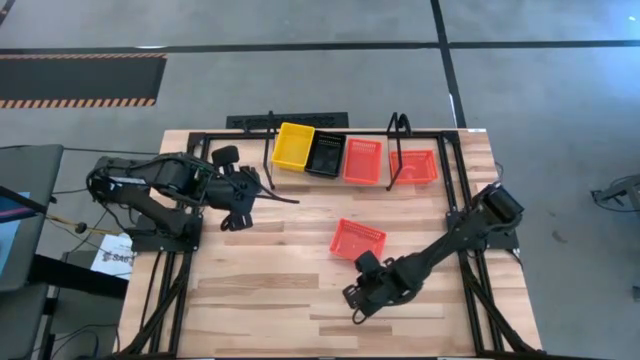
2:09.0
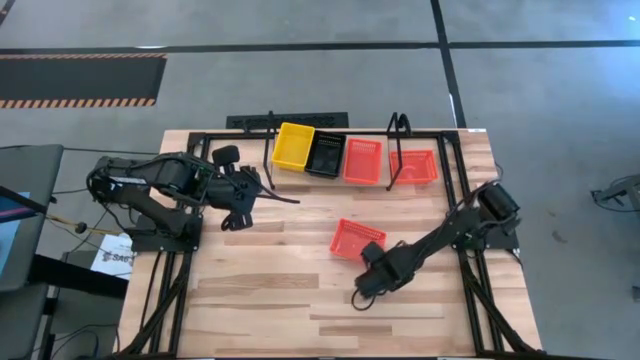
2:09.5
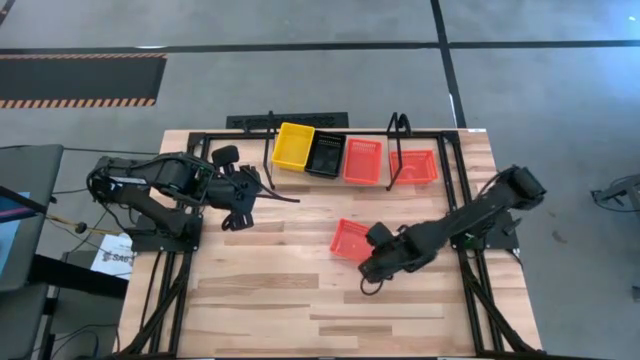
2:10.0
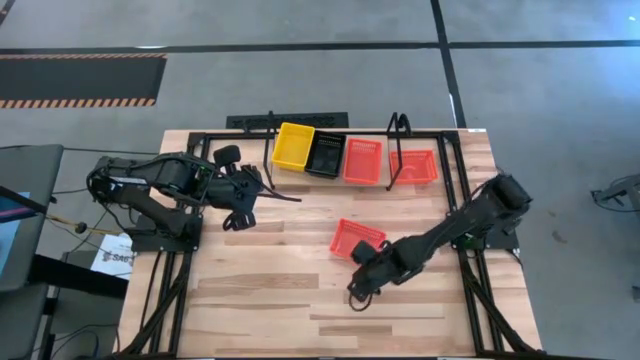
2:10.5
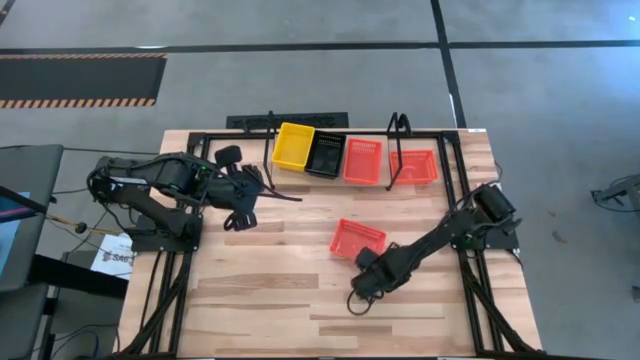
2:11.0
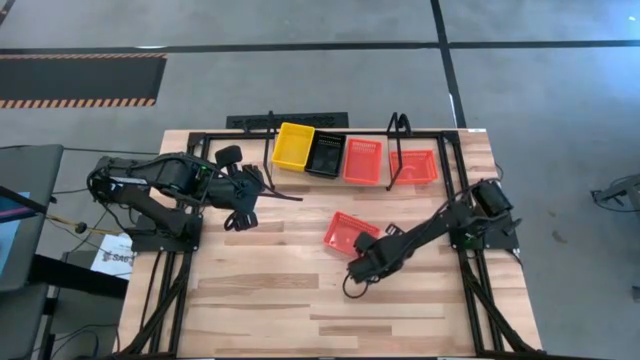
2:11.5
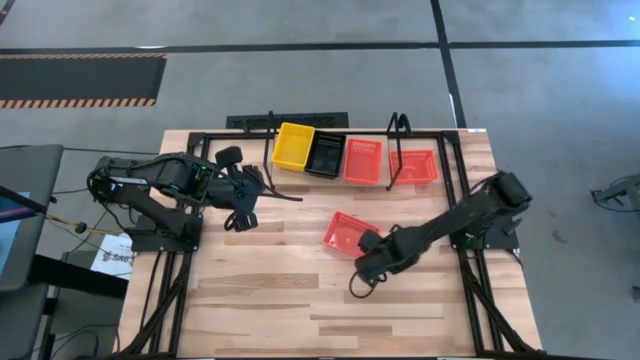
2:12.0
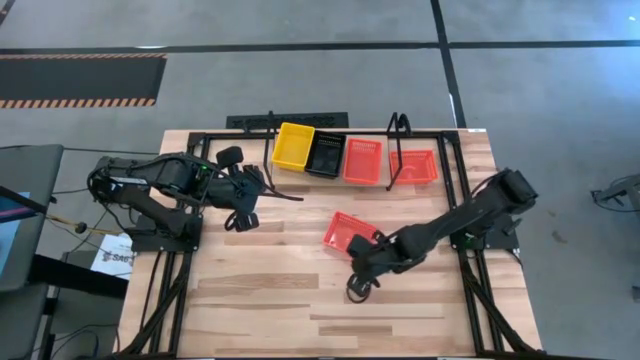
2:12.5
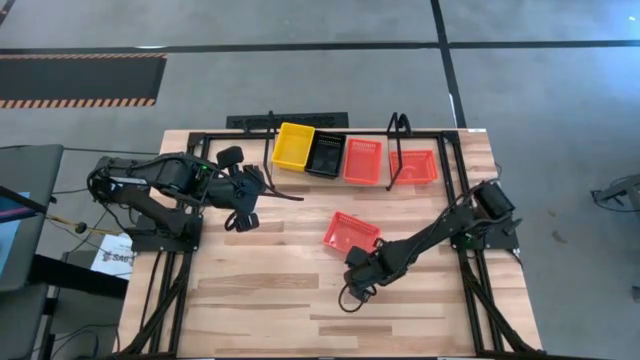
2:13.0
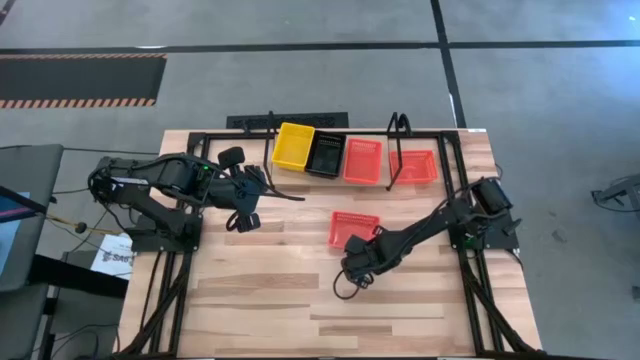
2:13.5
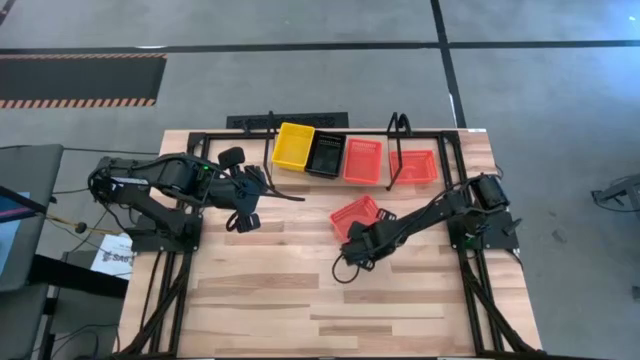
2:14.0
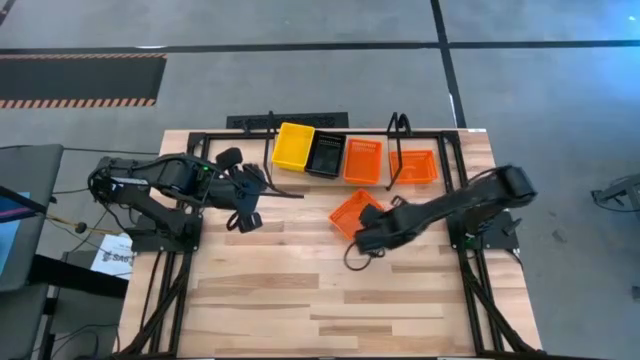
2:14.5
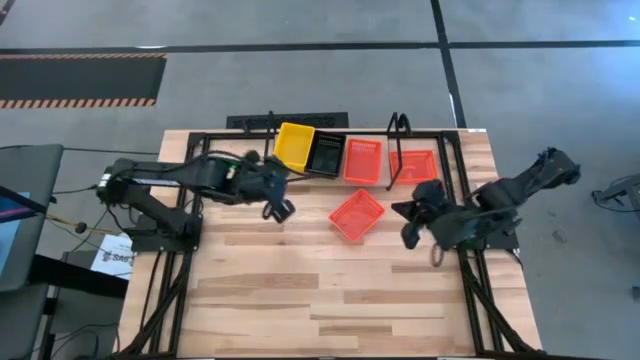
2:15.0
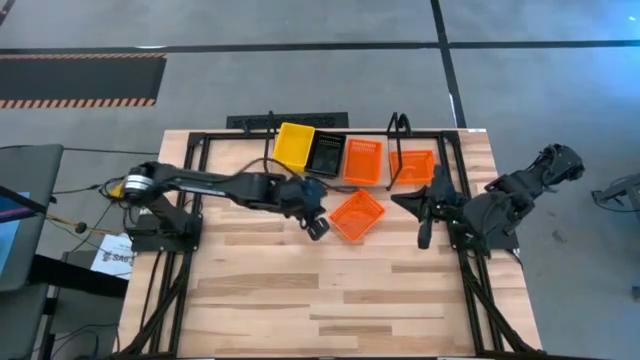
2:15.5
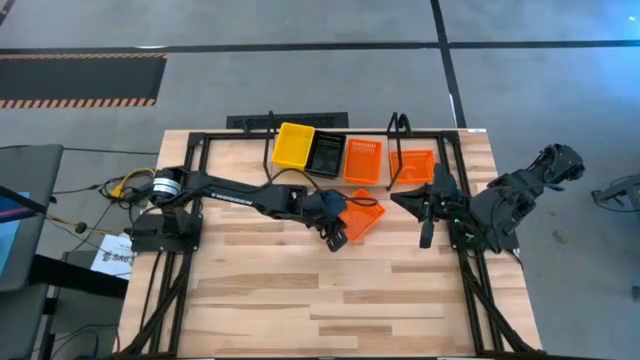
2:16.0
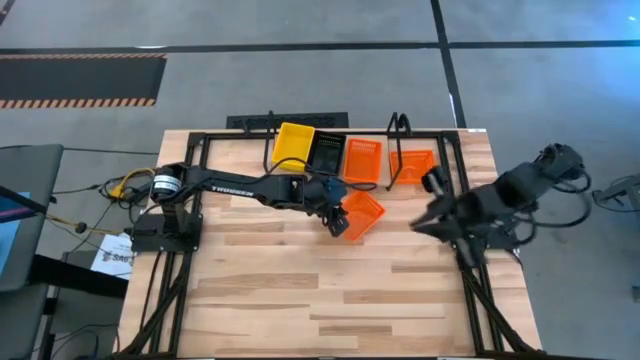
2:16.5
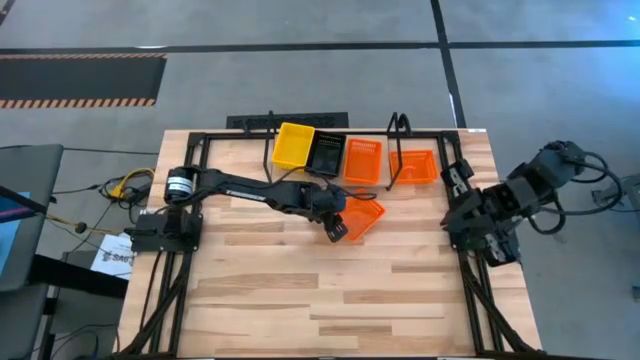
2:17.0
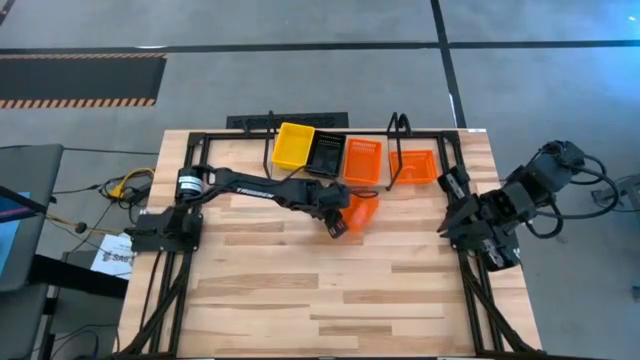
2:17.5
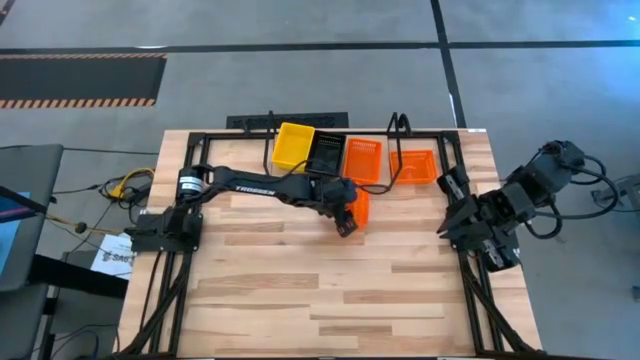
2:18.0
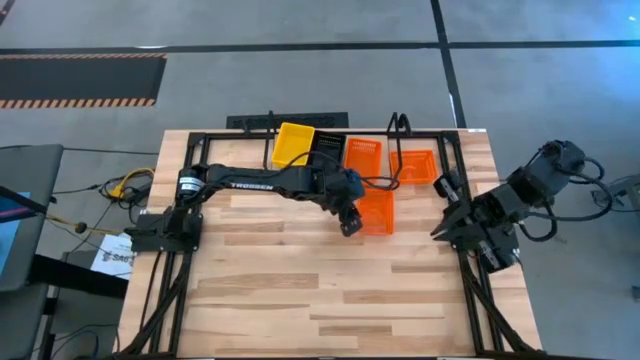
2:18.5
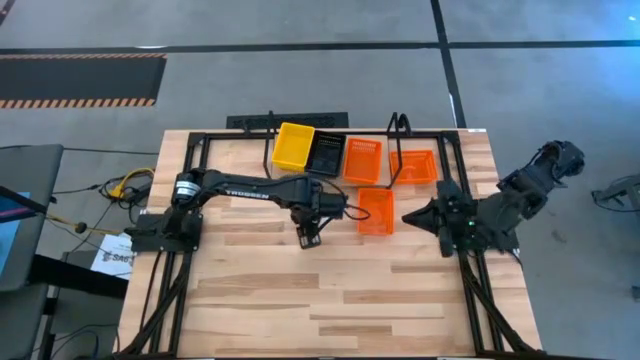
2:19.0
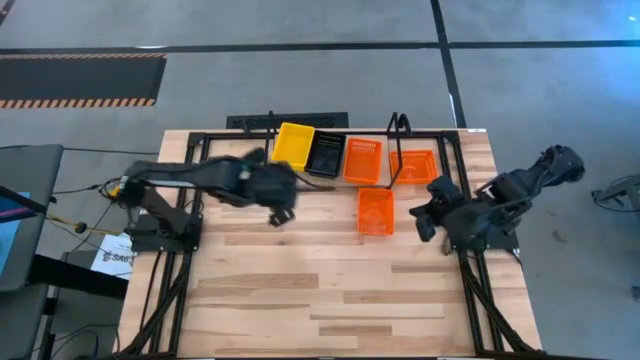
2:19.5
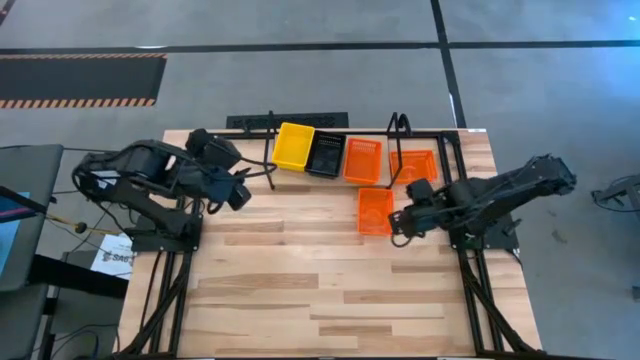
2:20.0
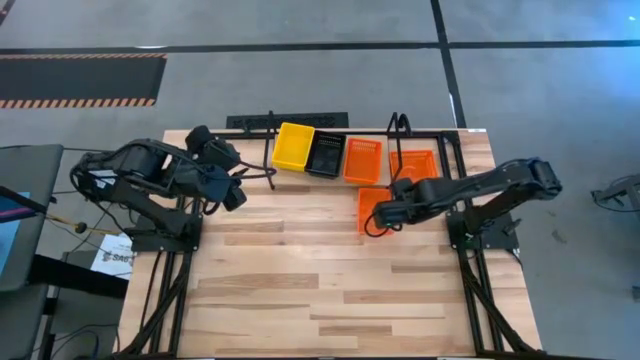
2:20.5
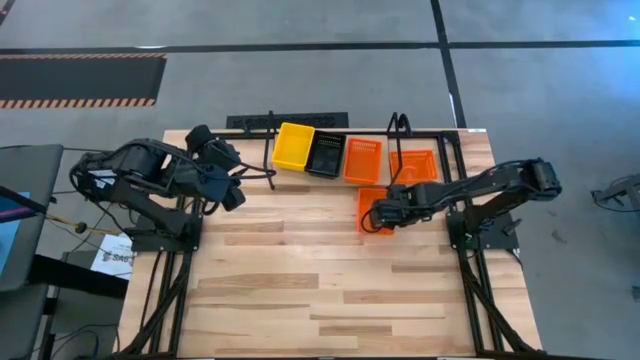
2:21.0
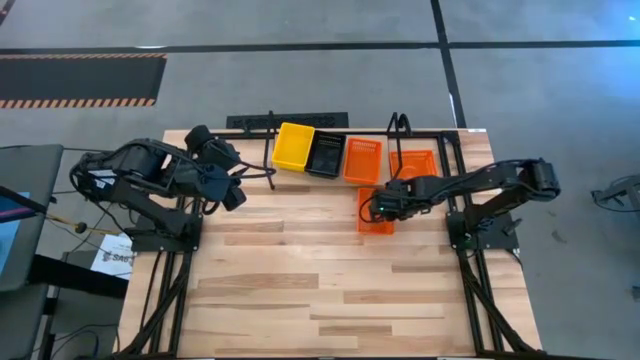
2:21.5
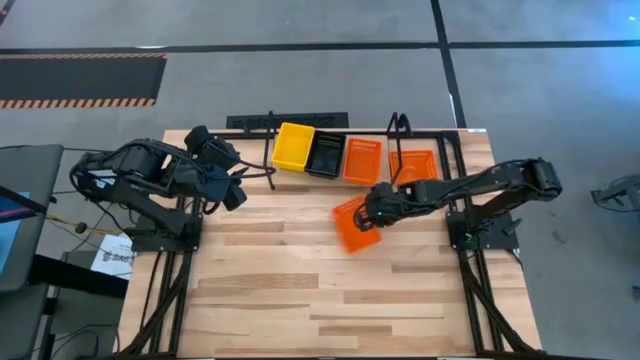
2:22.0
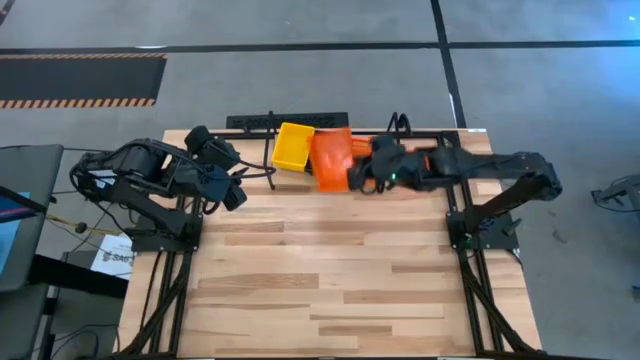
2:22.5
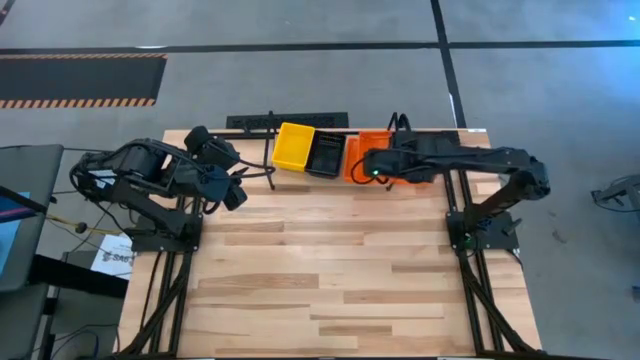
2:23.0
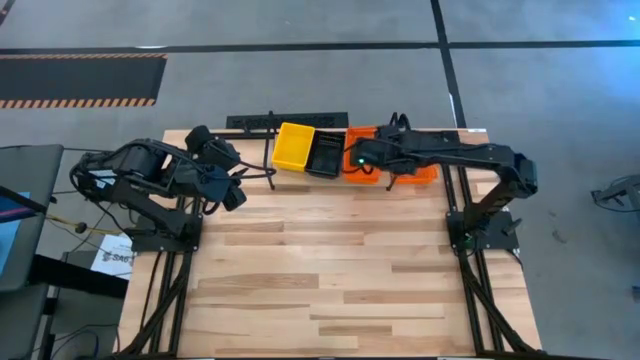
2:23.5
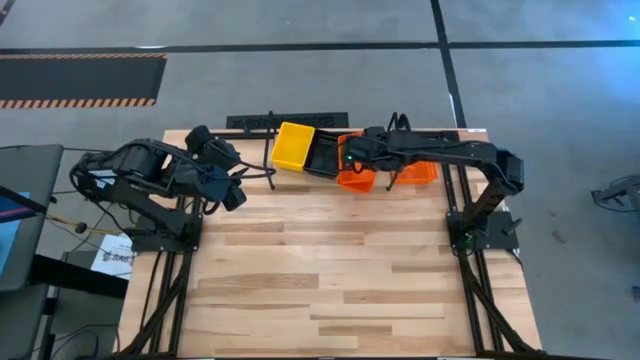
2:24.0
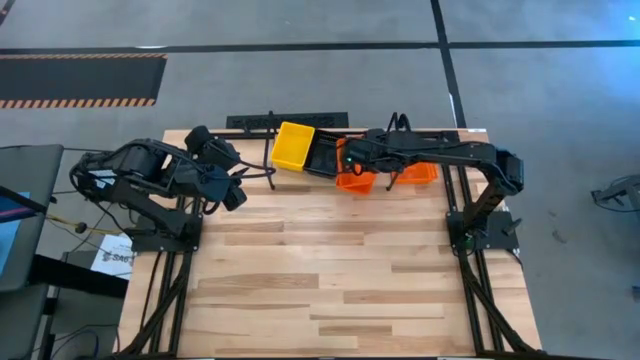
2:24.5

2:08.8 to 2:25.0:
Task: Stack baskets on shelf by color
Stack the bottom orange bin on top of the other orange bin on the shelf

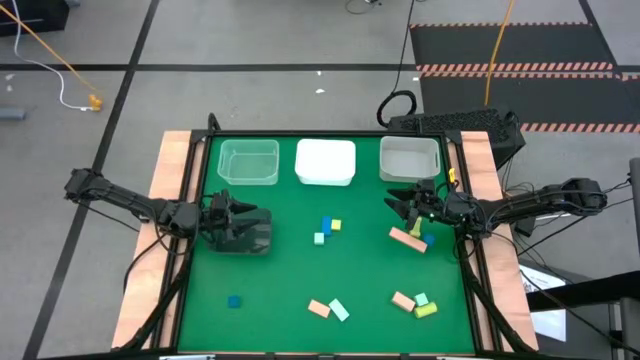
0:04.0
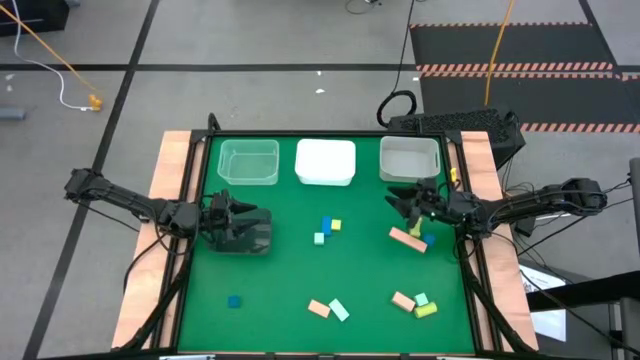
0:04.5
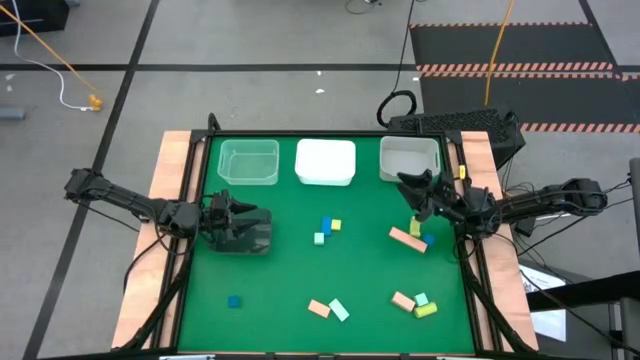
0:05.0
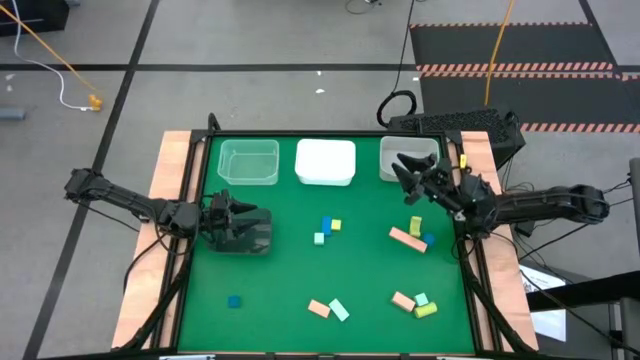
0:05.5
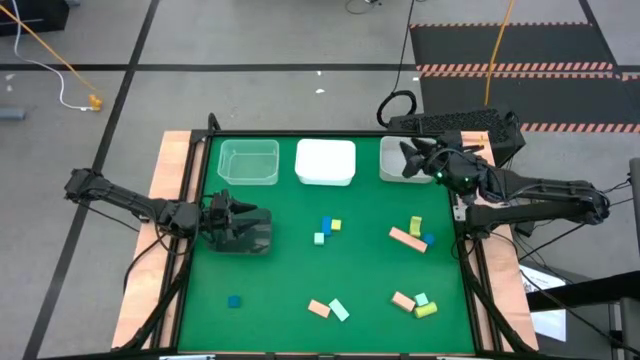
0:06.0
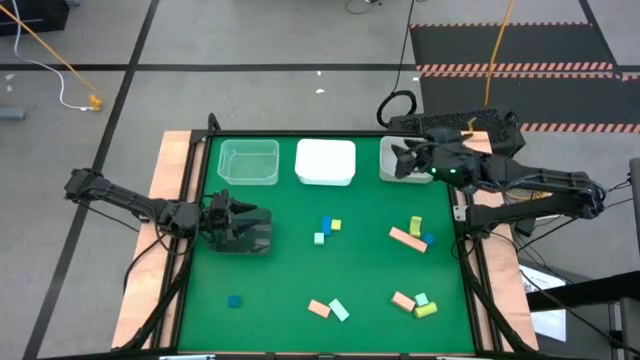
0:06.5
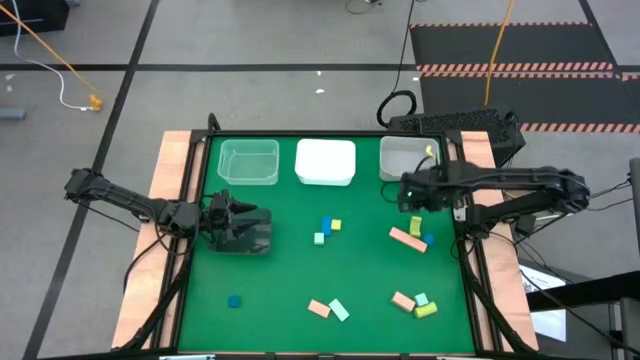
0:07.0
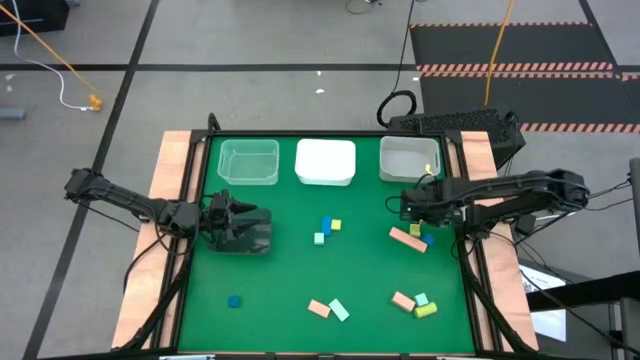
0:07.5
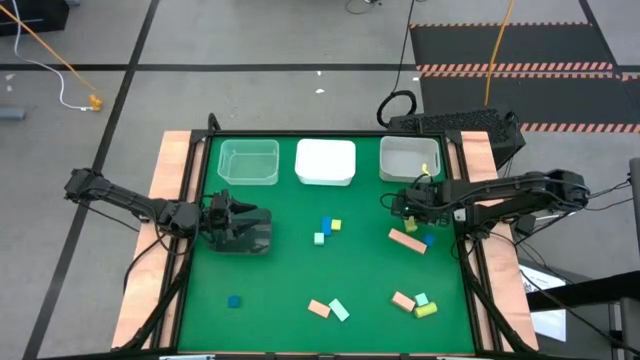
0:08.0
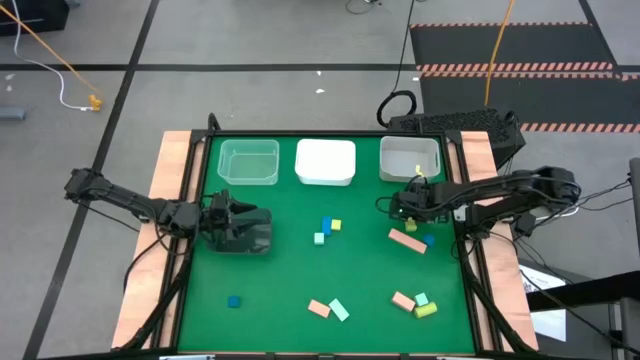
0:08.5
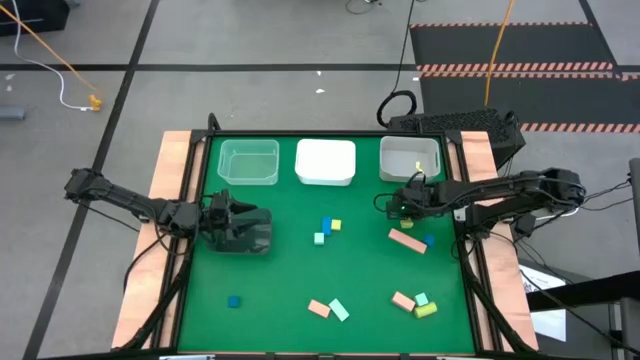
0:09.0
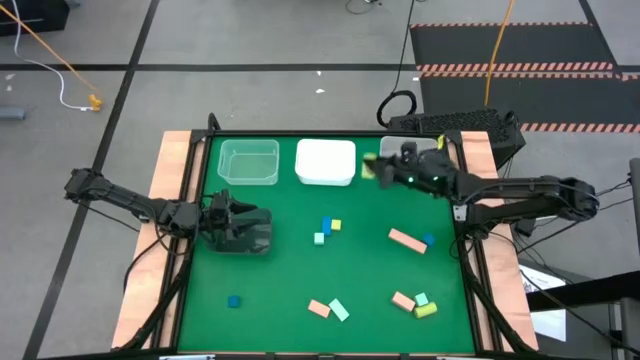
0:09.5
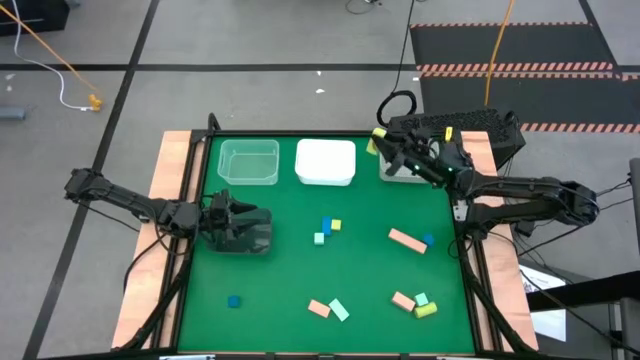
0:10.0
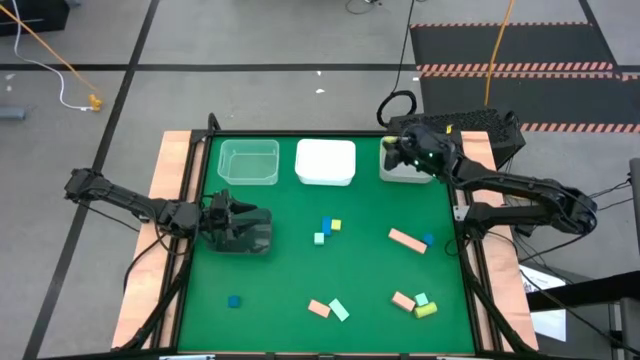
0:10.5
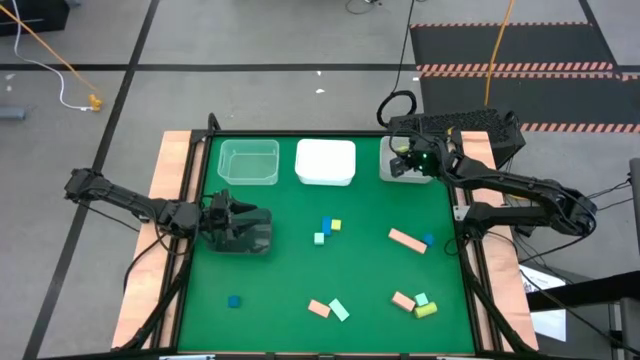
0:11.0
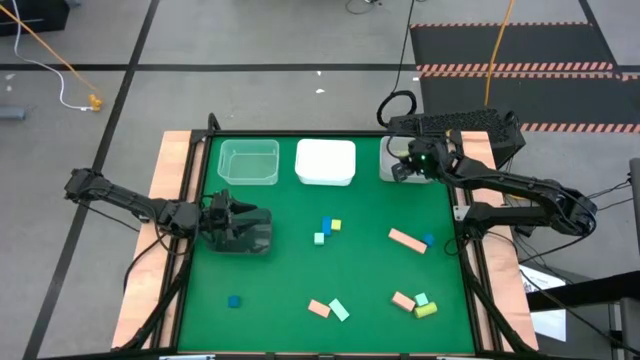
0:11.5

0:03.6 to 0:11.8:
Task: Sort & place blocks by color
Put the light green block into the gray bin
